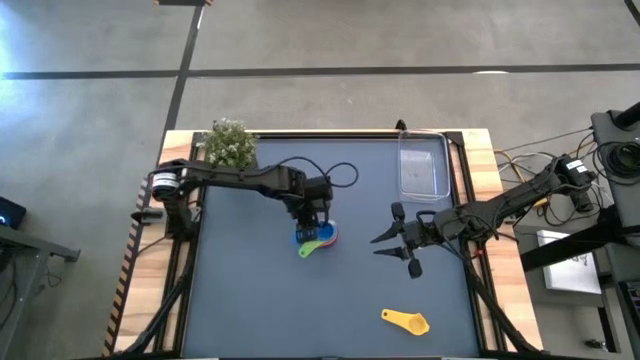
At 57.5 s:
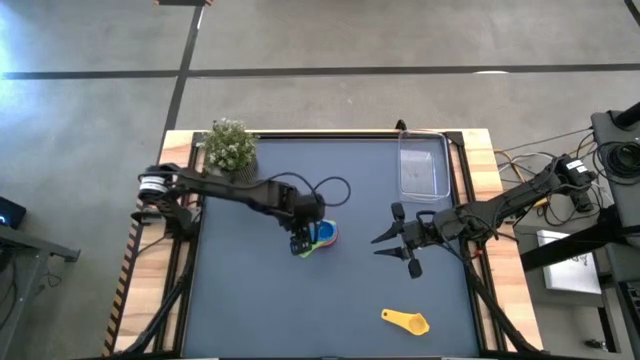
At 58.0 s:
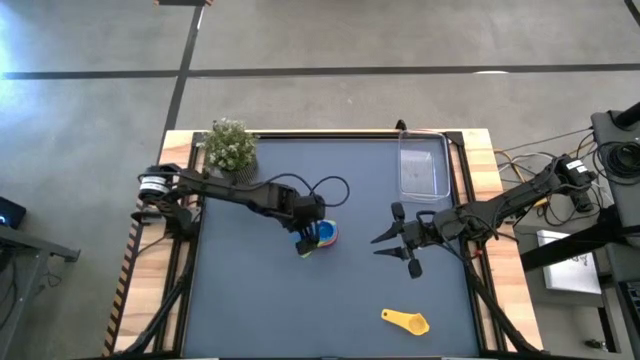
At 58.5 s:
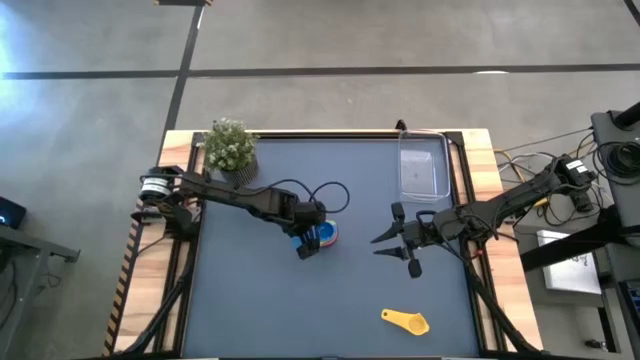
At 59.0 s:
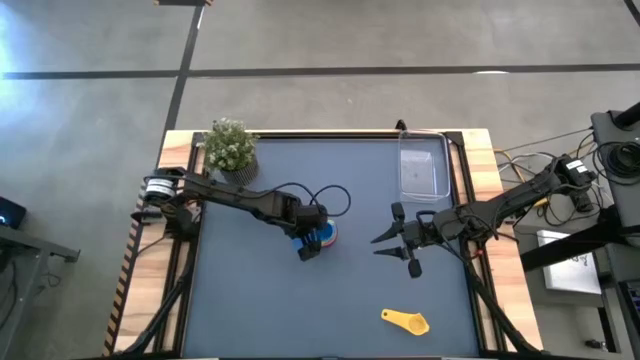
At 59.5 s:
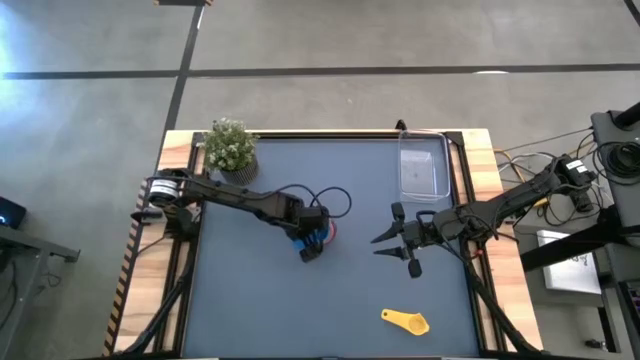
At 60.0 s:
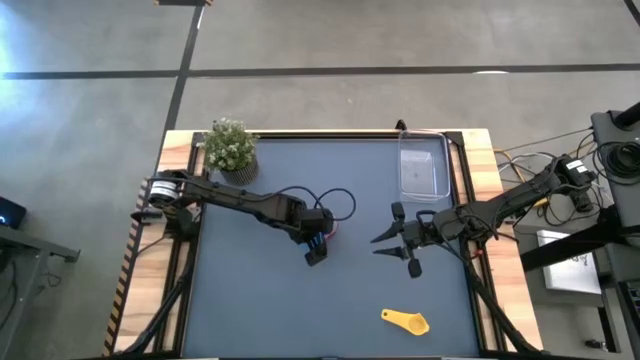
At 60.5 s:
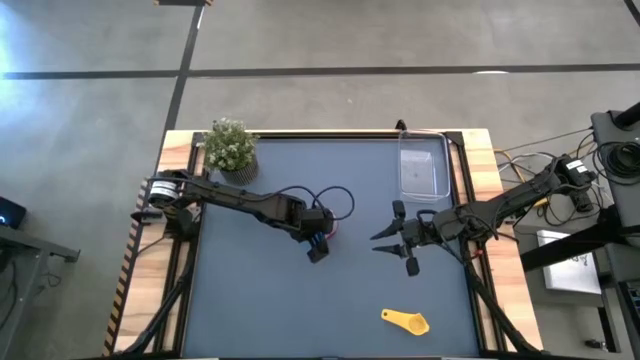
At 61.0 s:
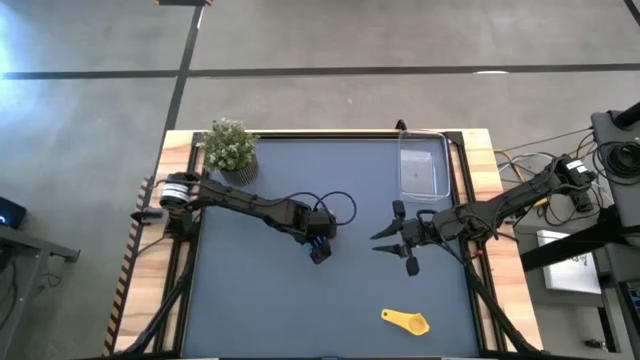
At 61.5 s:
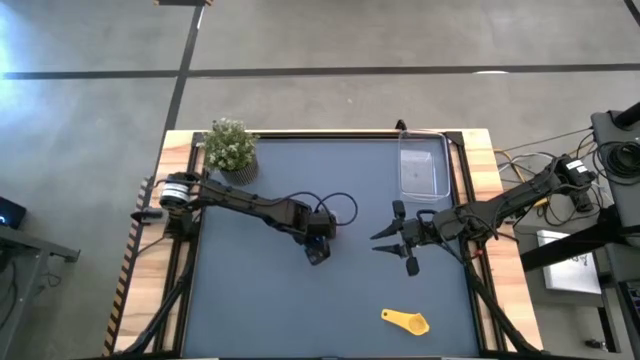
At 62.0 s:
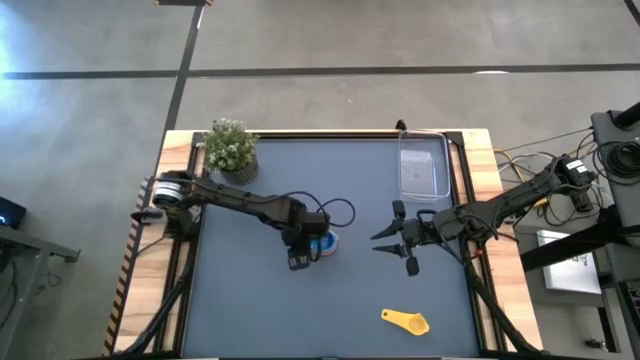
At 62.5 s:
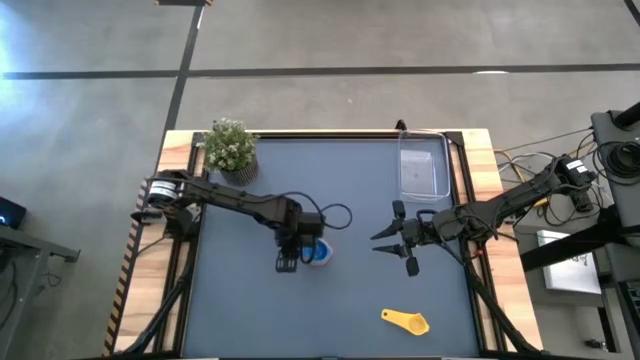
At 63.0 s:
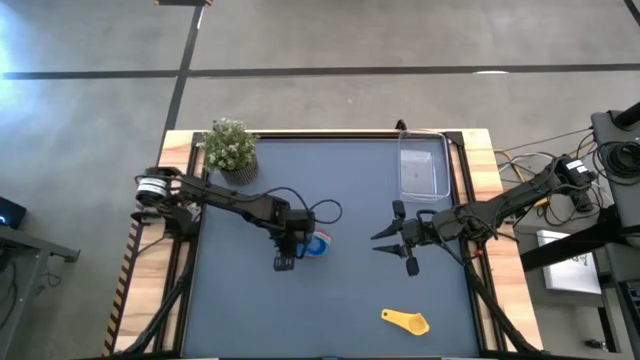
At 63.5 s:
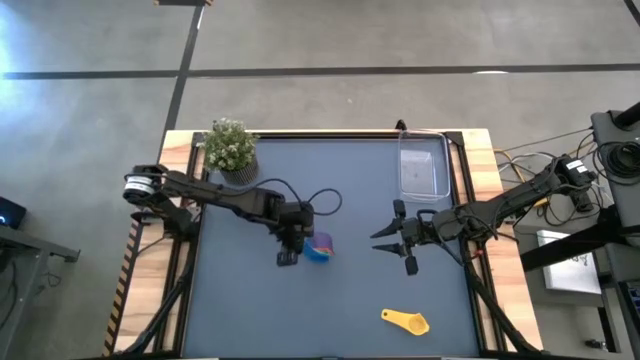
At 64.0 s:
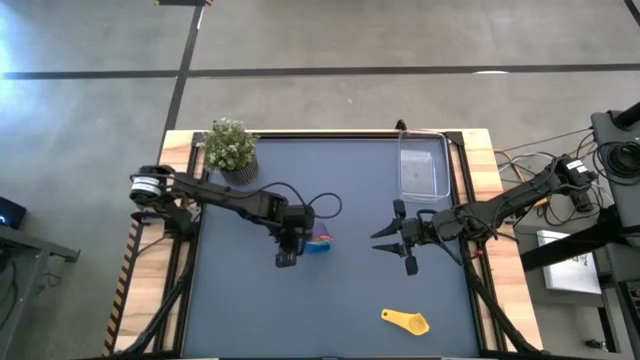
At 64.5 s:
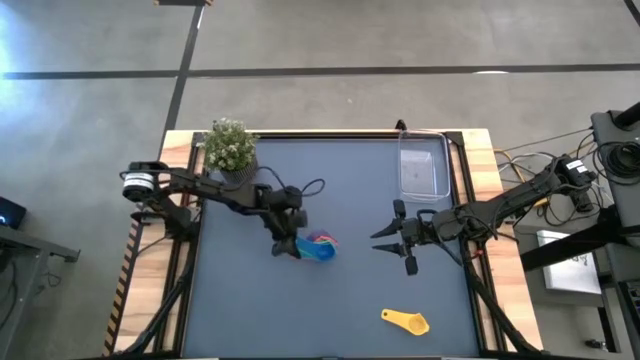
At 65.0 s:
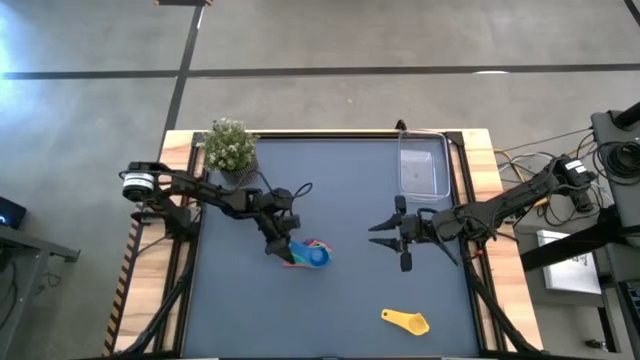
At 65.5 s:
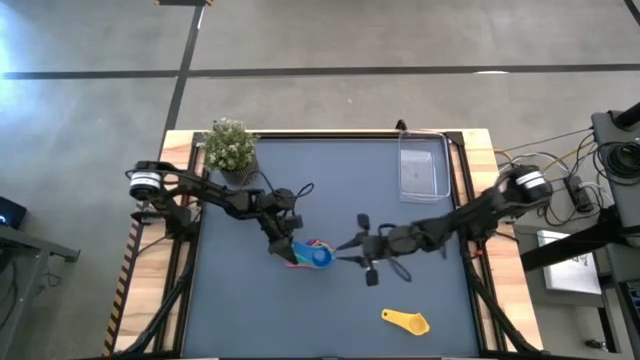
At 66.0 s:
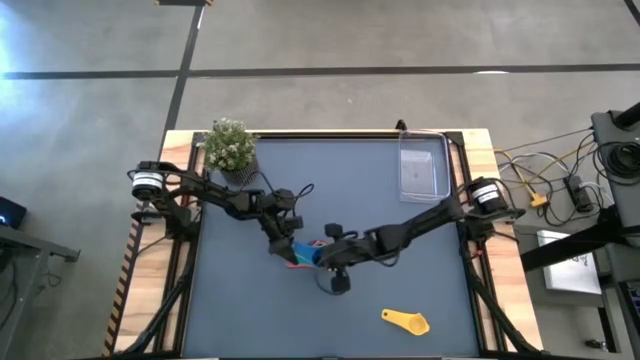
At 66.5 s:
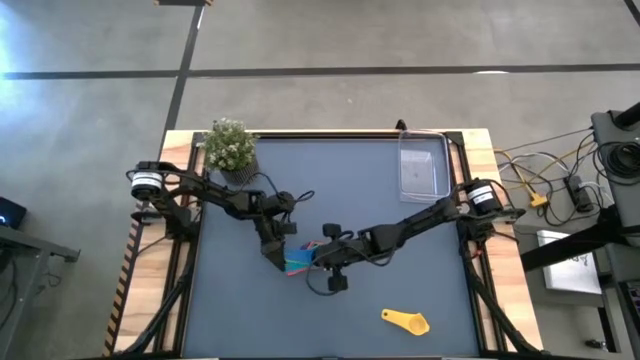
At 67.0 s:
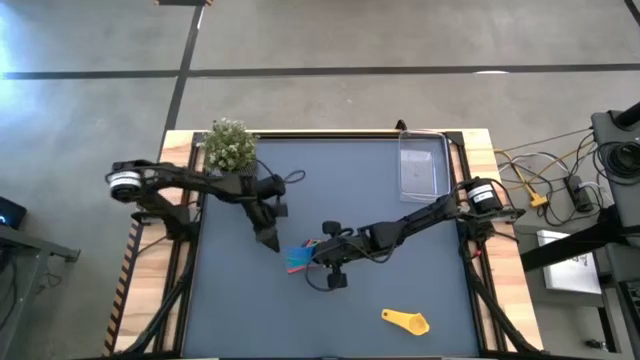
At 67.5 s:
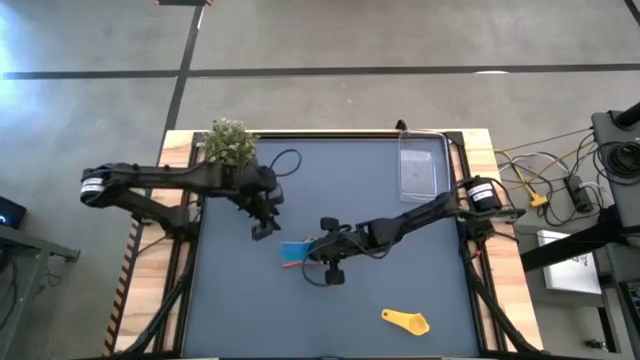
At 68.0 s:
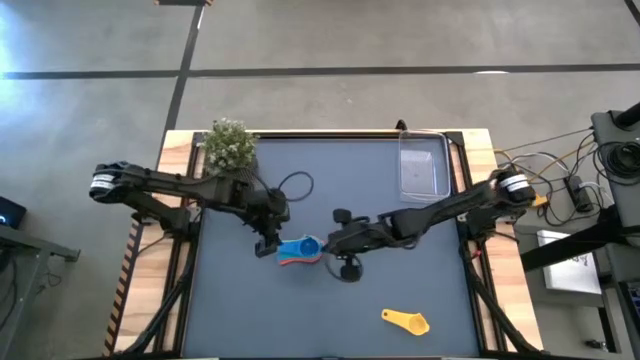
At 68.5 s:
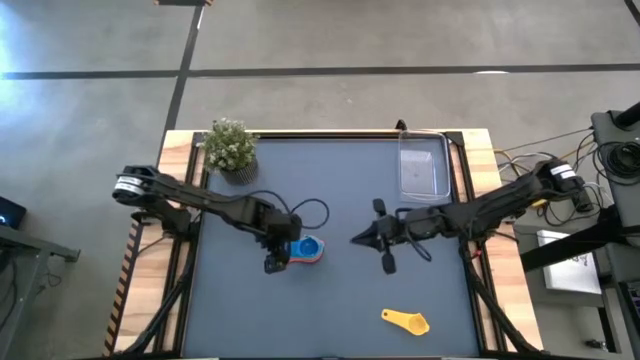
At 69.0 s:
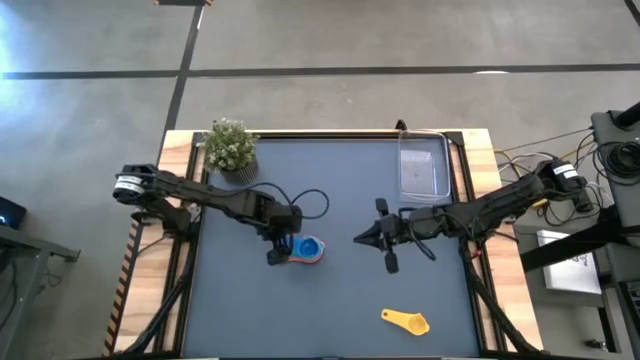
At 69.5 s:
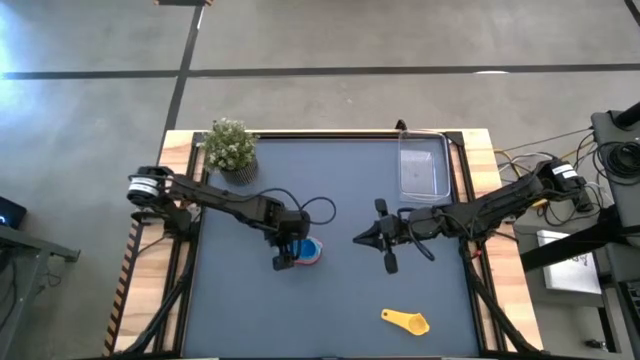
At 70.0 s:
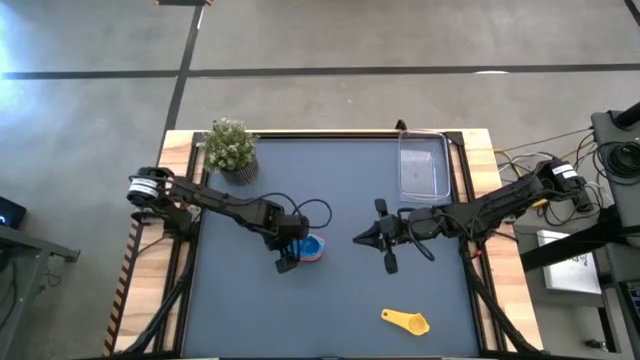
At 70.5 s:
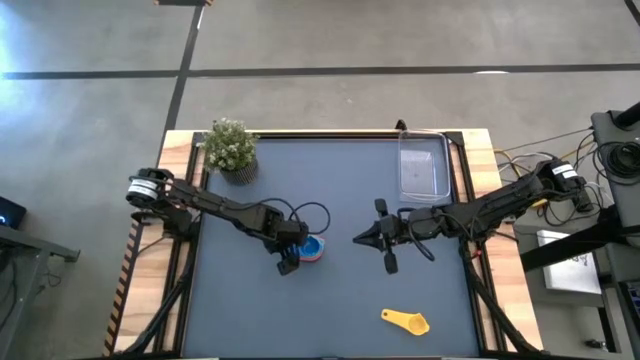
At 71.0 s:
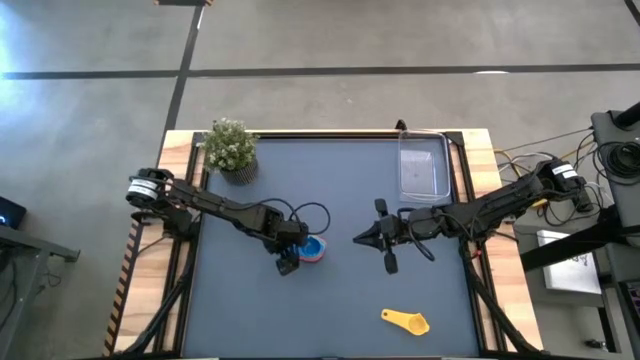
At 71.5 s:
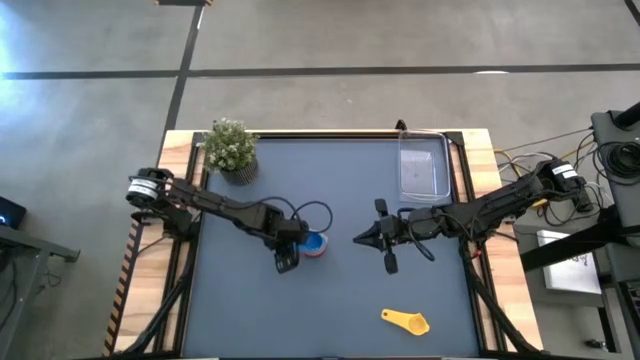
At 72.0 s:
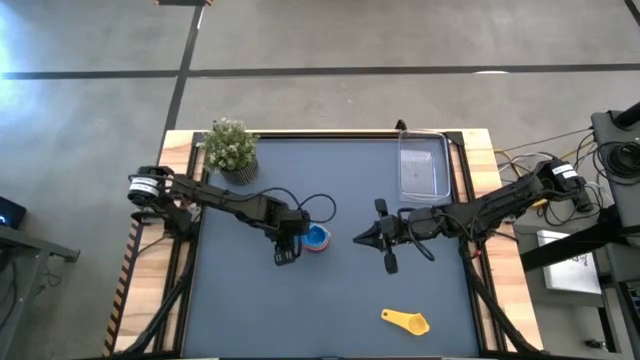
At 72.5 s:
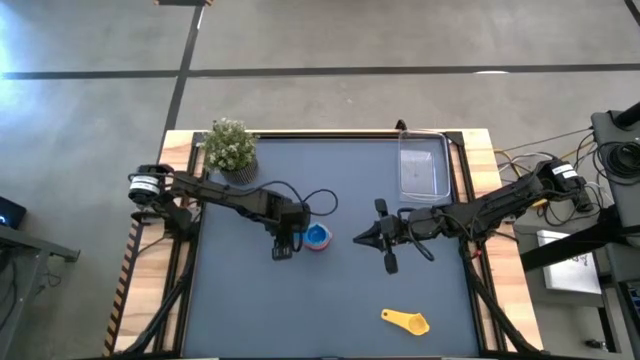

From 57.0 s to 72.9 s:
Task: Nest measuring cups in basket
Adjust the stacked measuring cups

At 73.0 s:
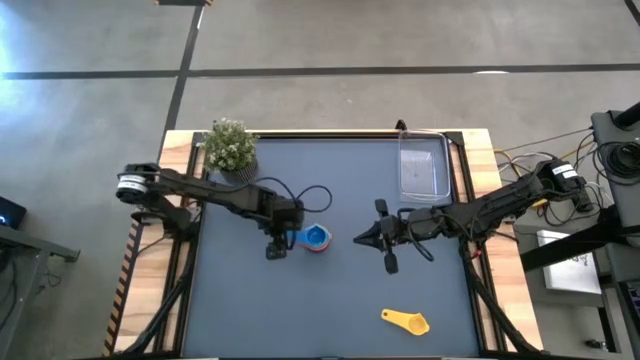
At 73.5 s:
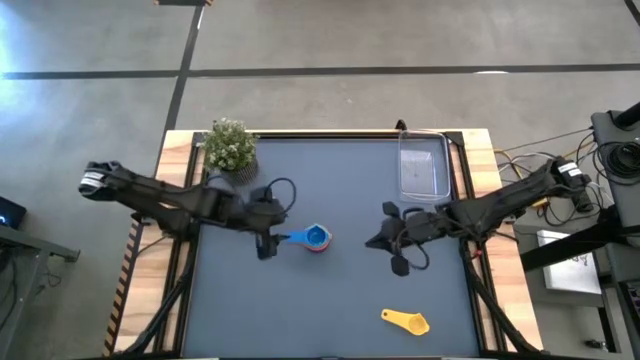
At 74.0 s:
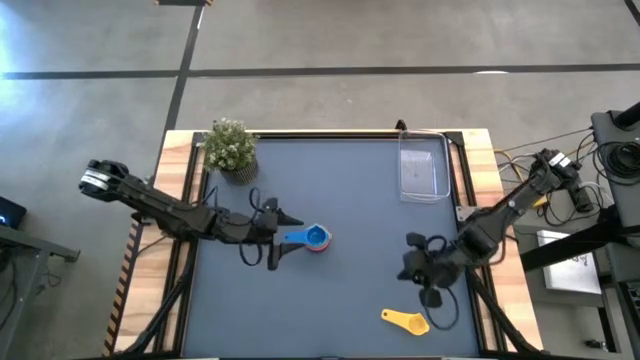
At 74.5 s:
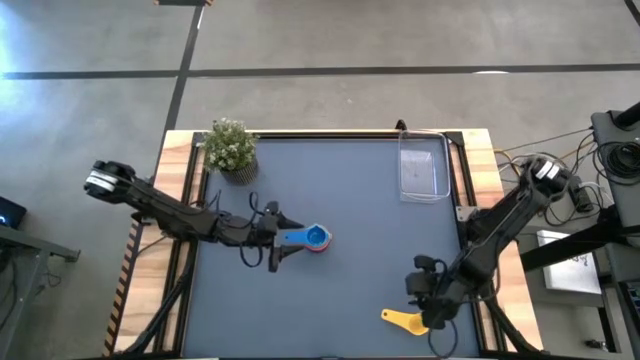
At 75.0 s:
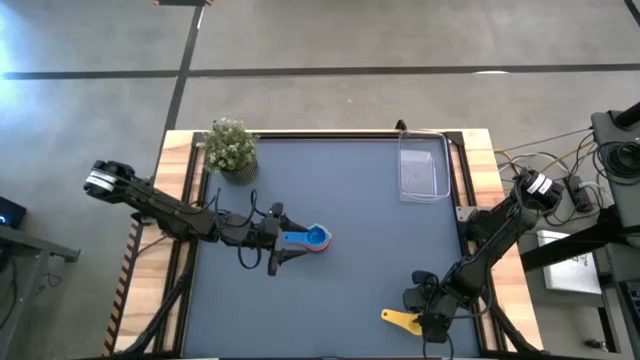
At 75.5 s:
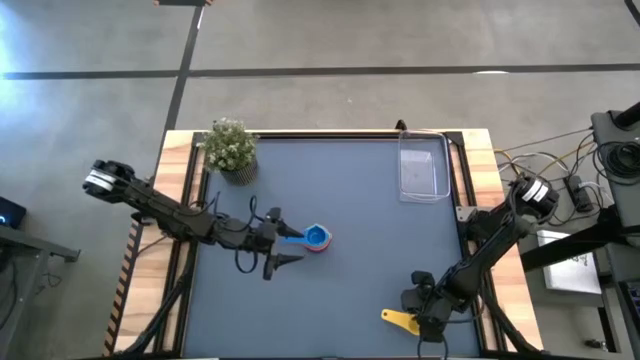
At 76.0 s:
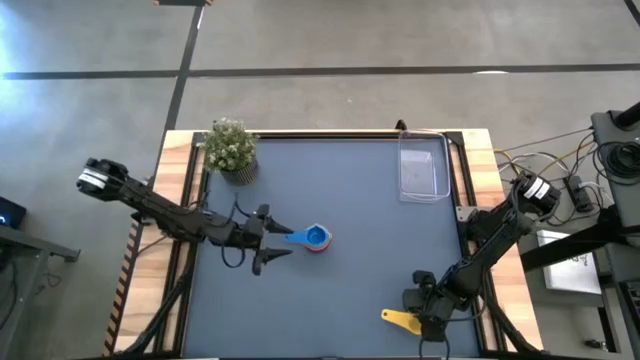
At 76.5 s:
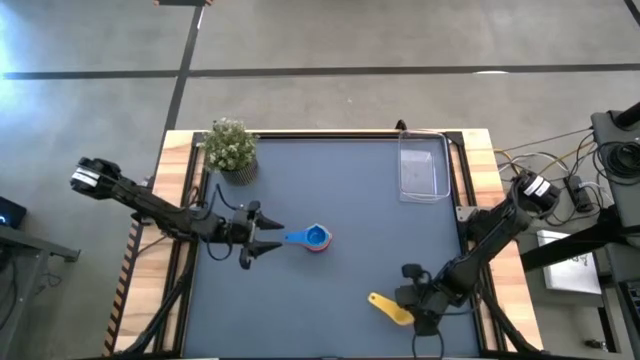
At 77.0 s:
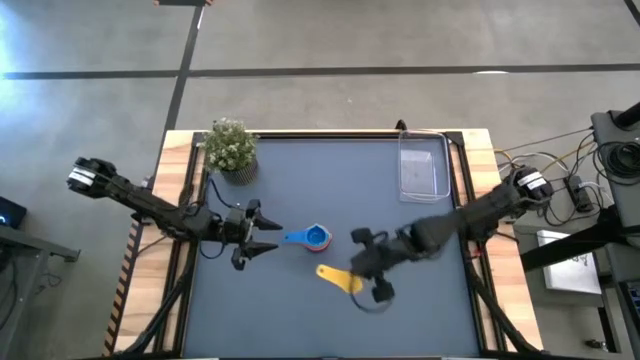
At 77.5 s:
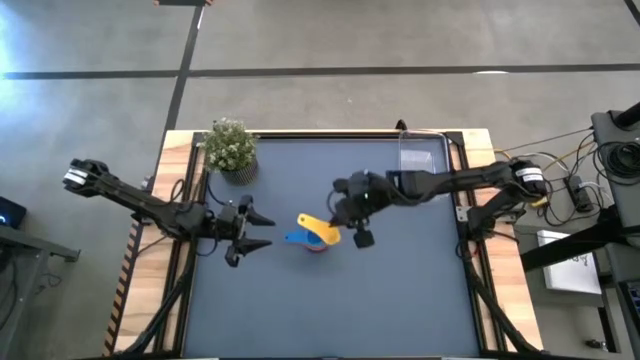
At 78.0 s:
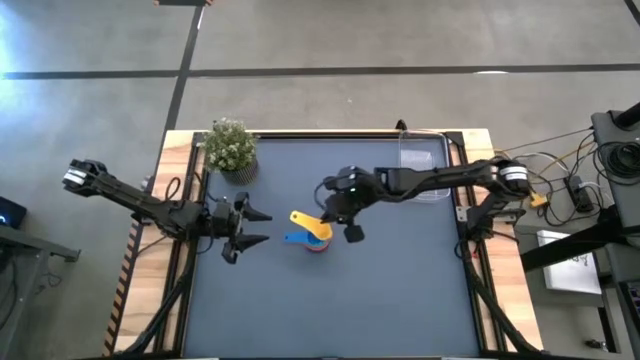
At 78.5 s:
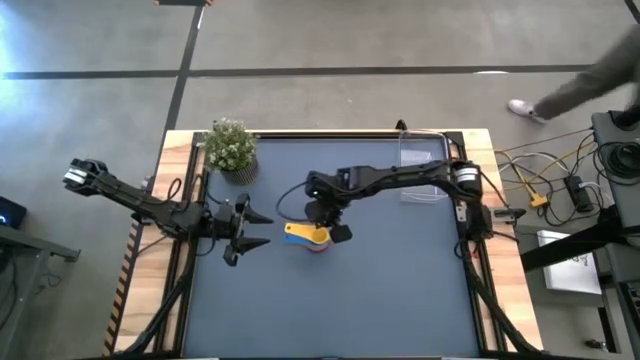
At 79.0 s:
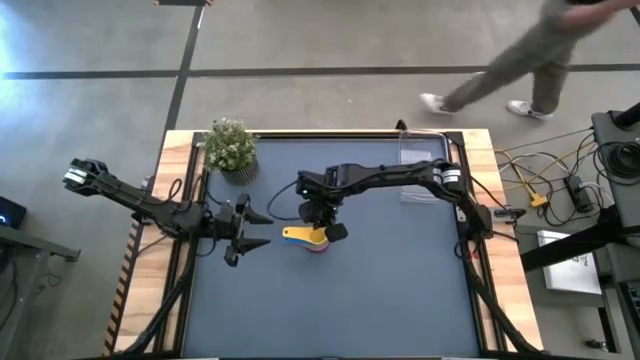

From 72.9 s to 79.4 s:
Stack the yellow measuring cup on top of the blue measuring cup
